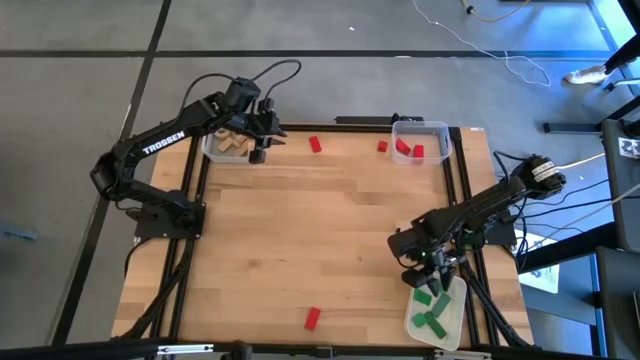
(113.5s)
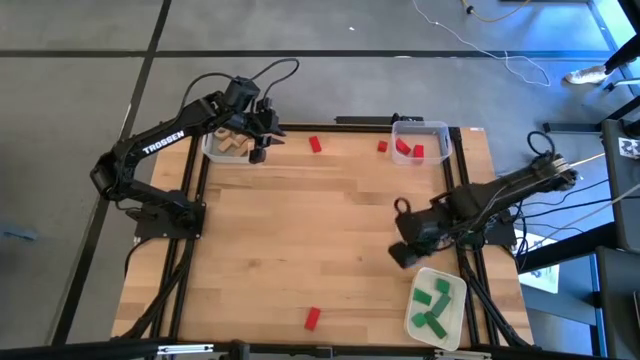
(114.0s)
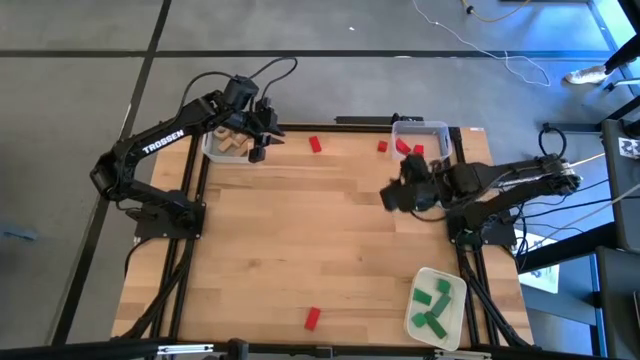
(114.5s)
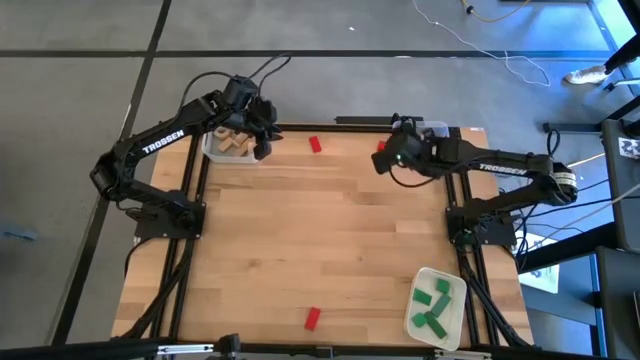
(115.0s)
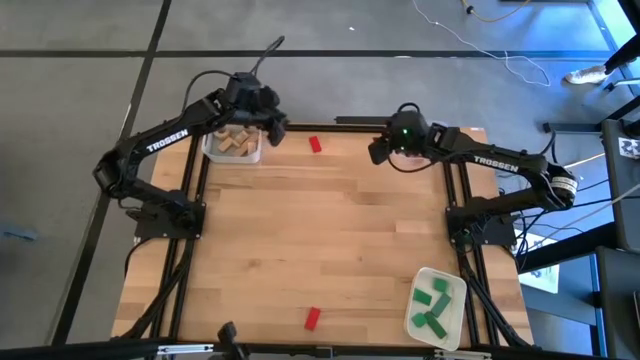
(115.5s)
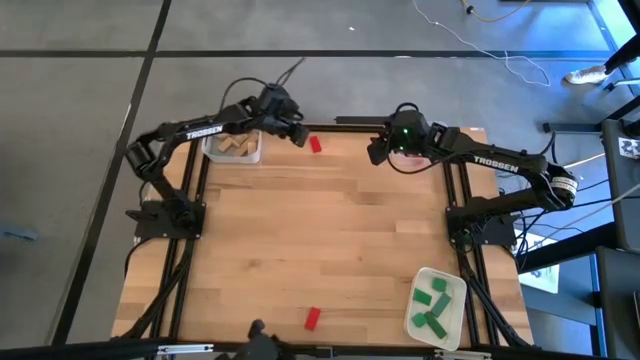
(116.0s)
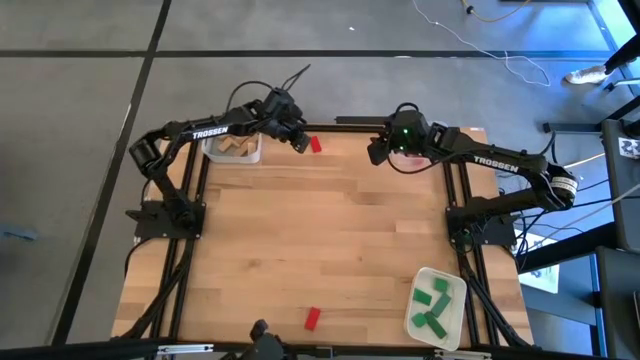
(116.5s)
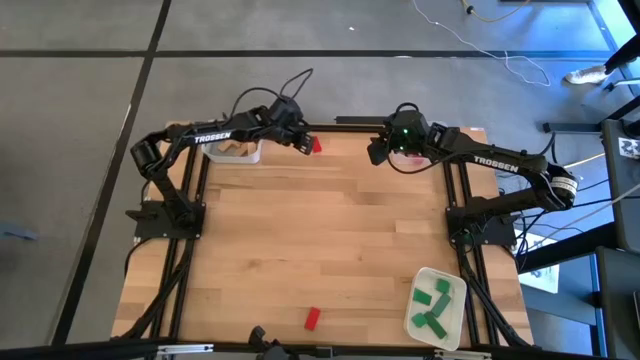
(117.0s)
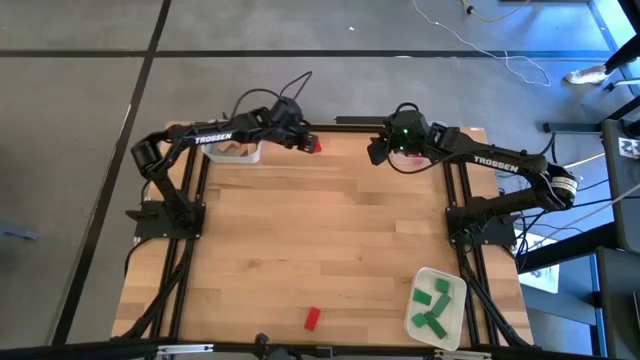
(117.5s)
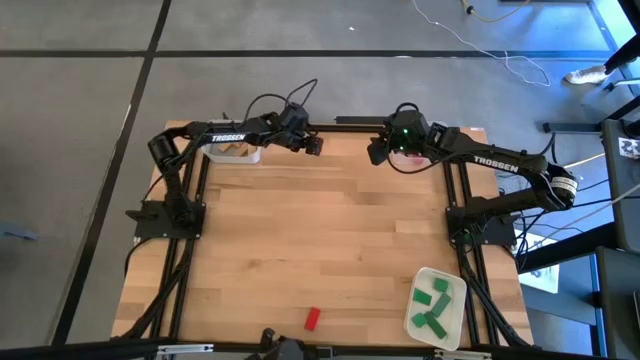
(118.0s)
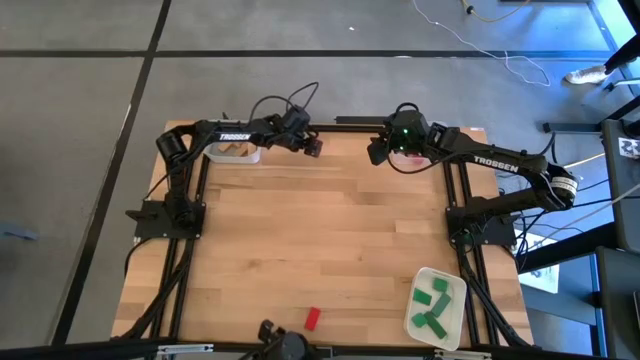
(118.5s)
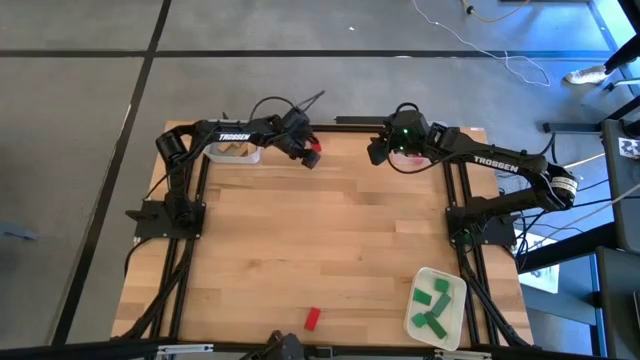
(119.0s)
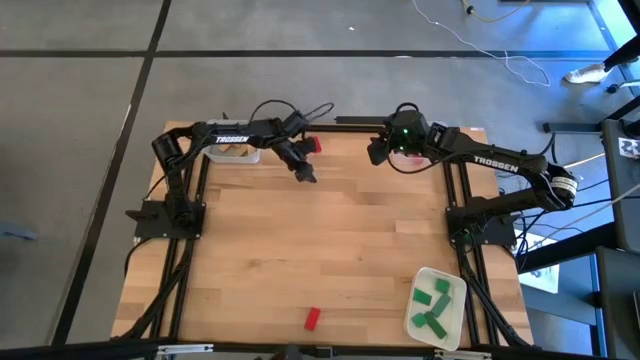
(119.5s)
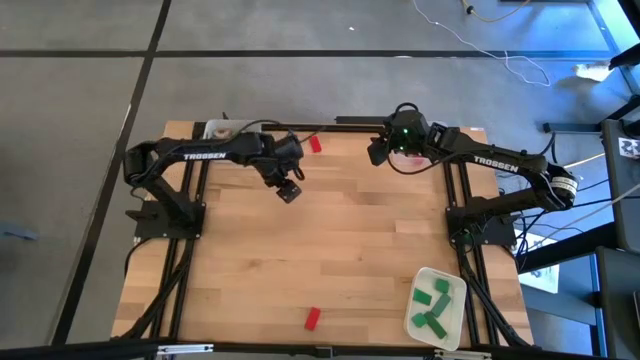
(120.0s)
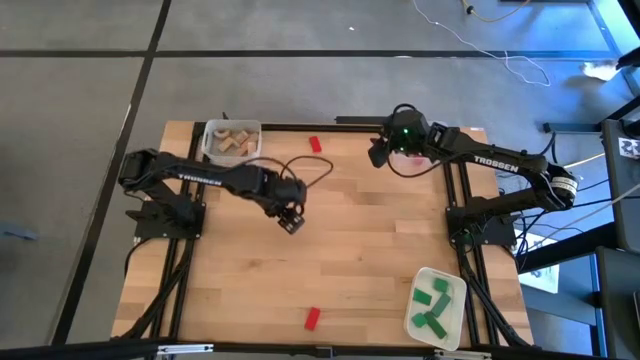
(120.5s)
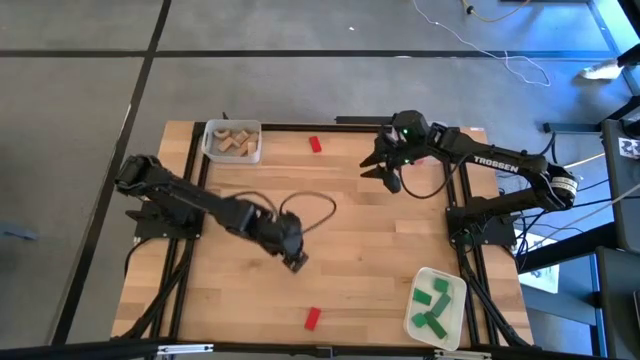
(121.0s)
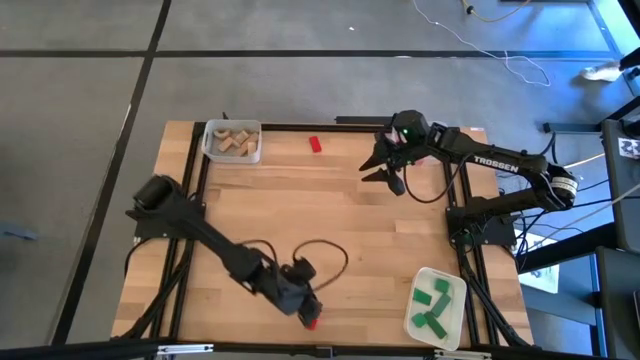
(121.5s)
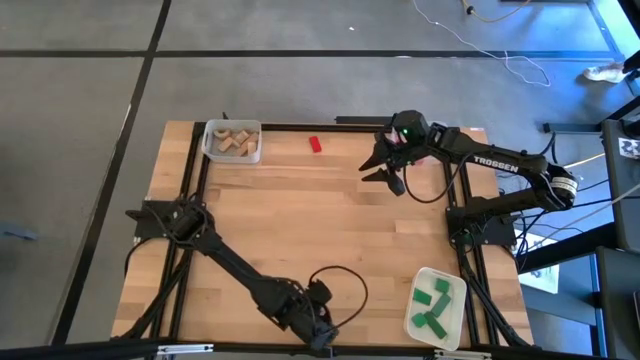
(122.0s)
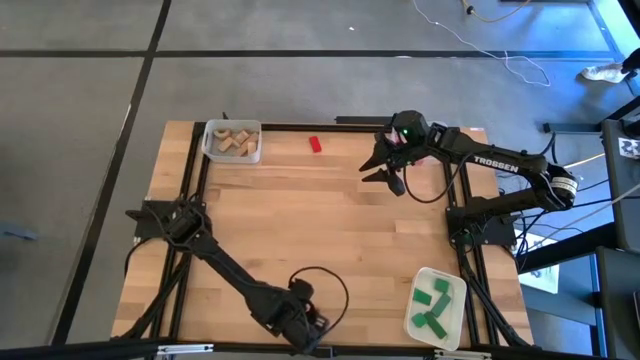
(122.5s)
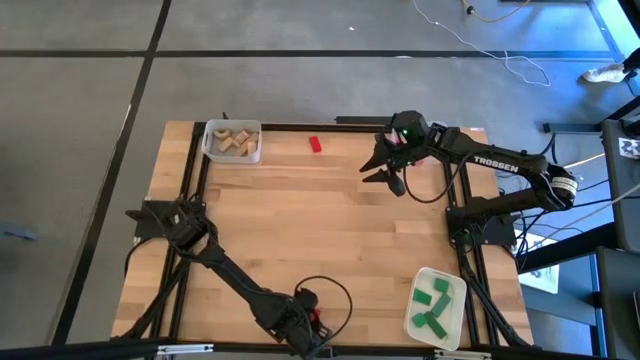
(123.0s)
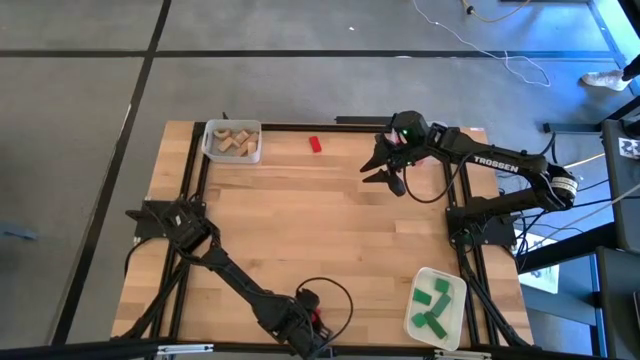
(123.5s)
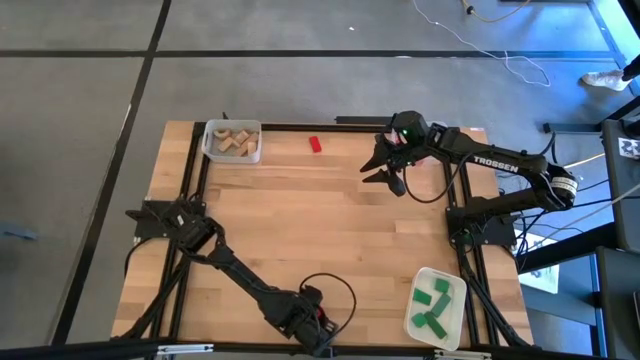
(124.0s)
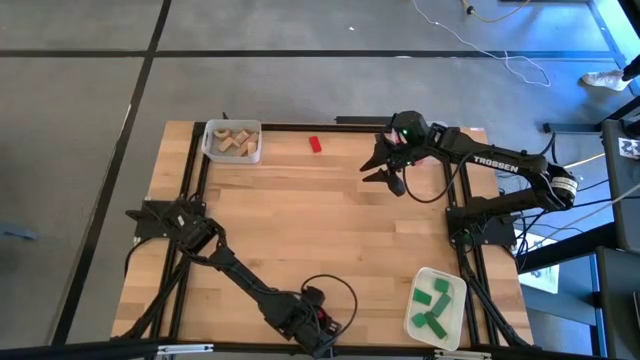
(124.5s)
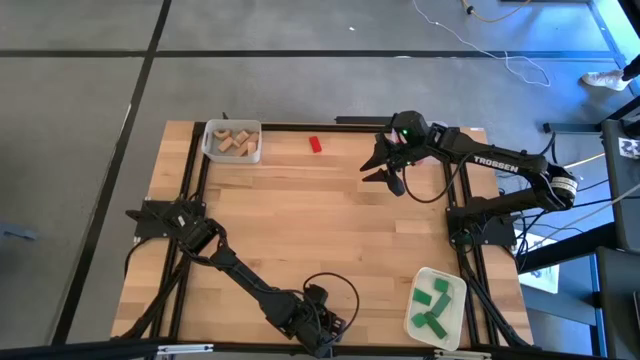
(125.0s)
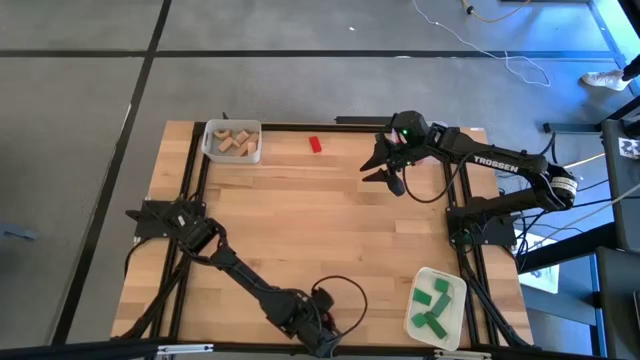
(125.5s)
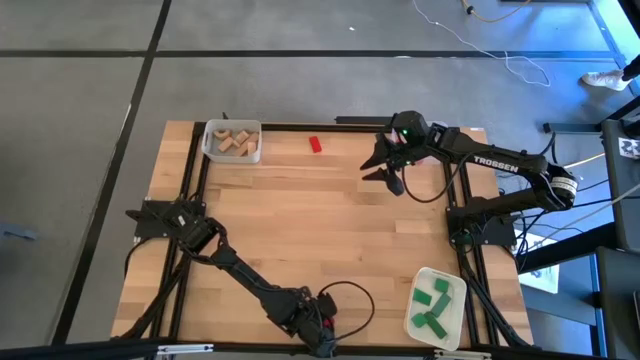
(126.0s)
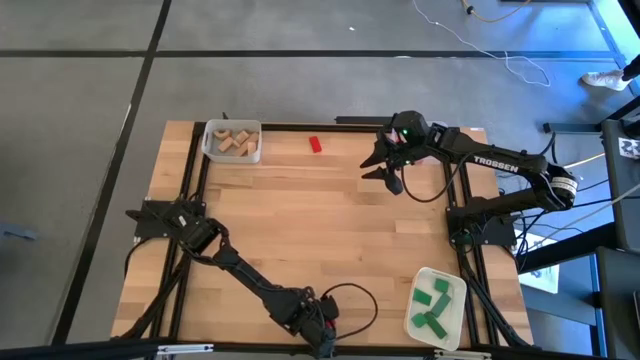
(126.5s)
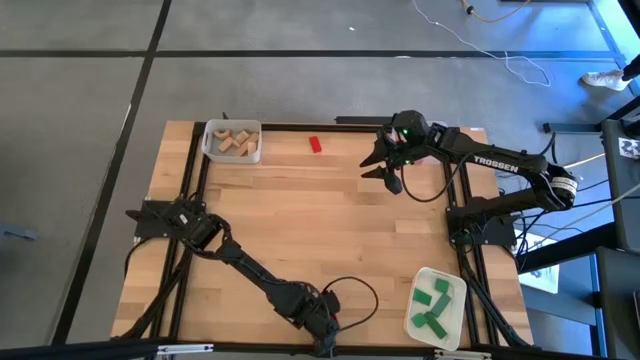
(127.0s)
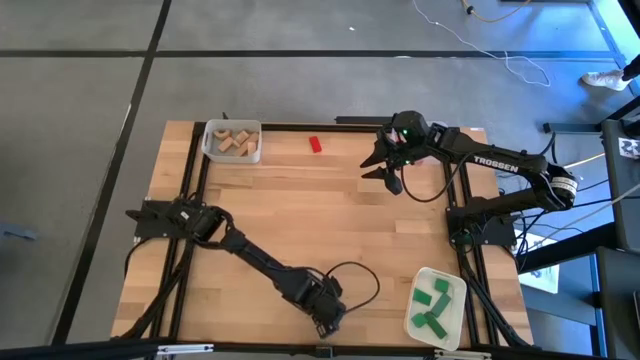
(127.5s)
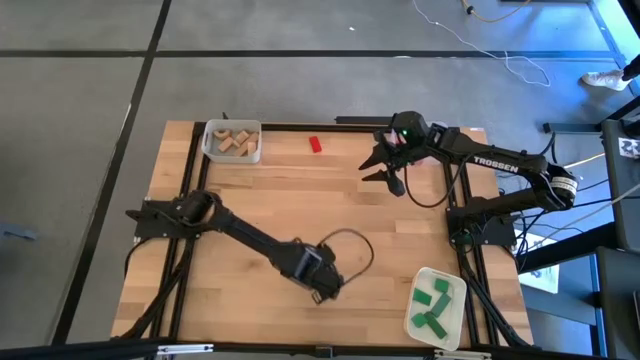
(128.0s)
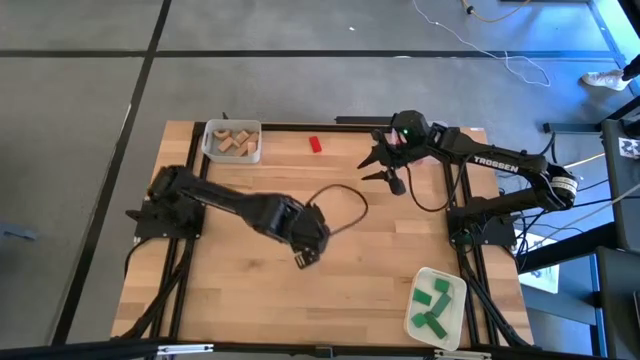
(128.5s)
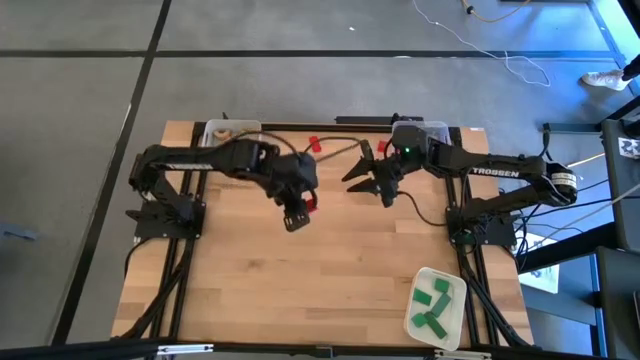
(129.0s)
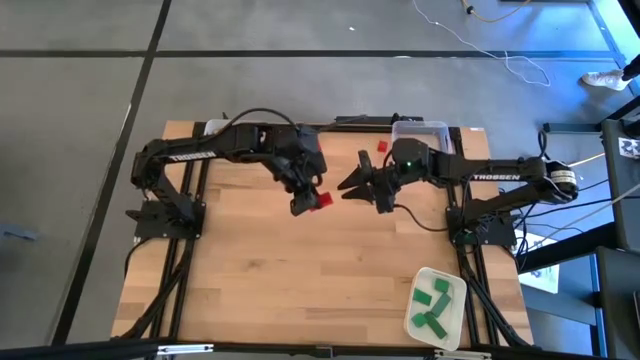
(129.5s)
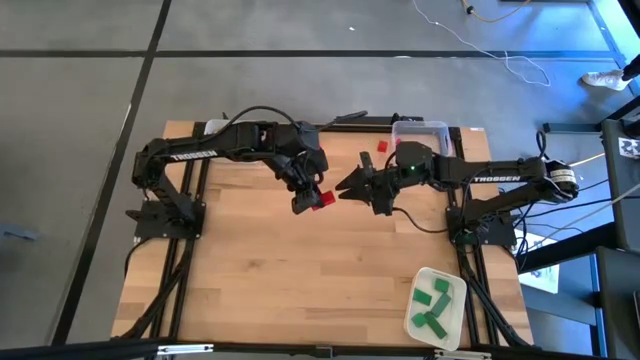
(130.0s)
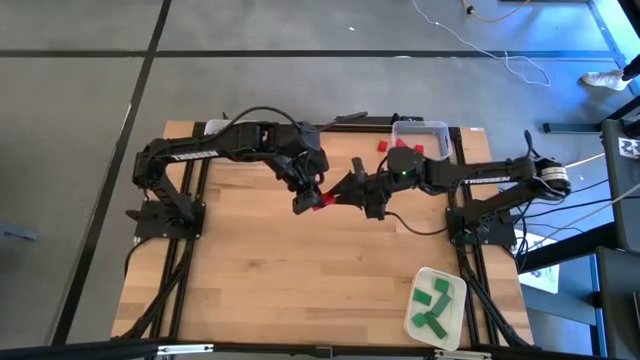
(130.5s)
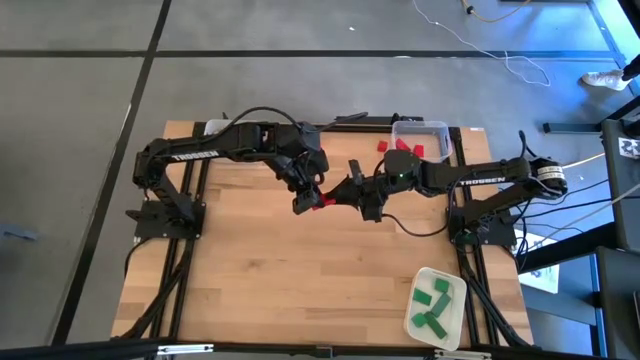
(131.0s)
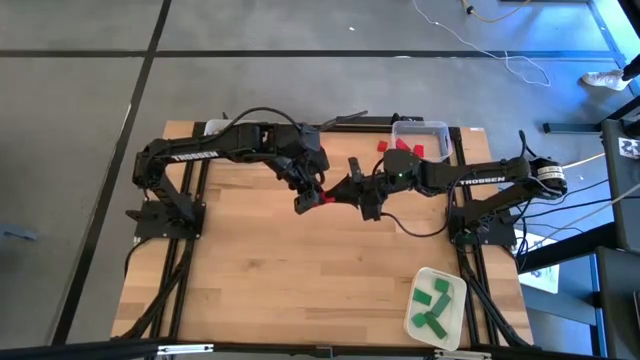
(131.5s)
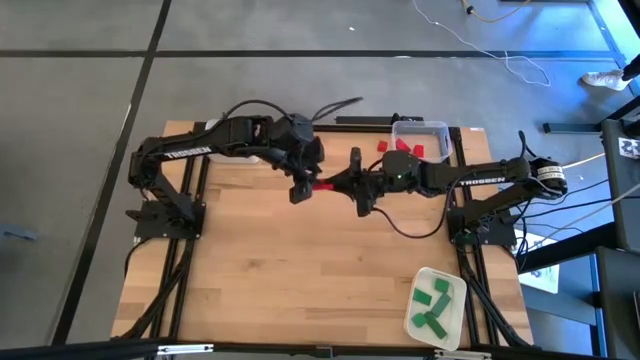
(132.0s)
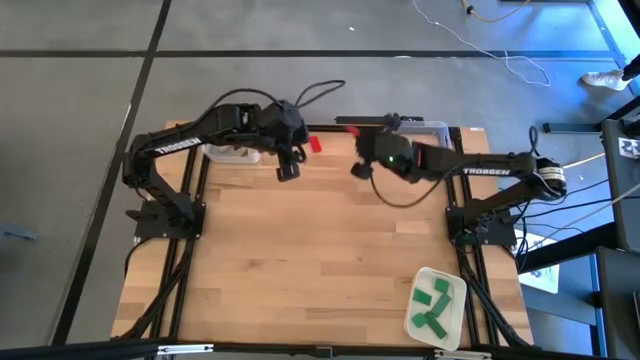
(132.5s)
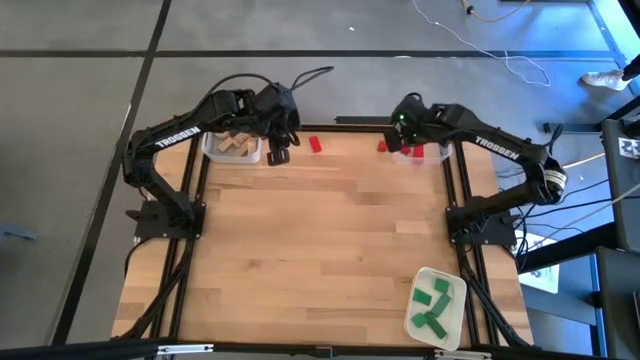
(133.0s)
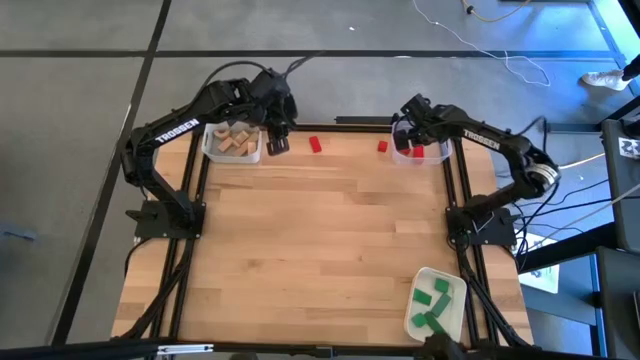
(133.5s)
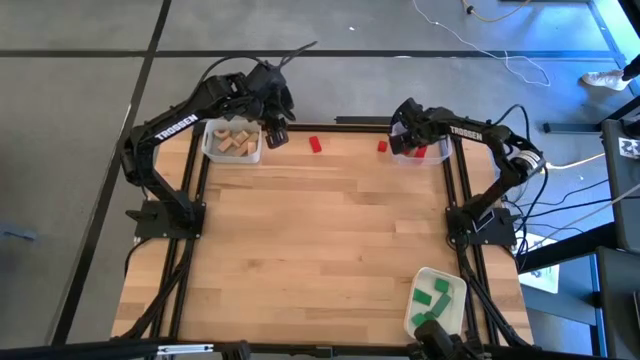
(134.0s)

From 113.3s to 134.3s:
Task: Sort & place blocks by color
Put the red block into the transparent bin
